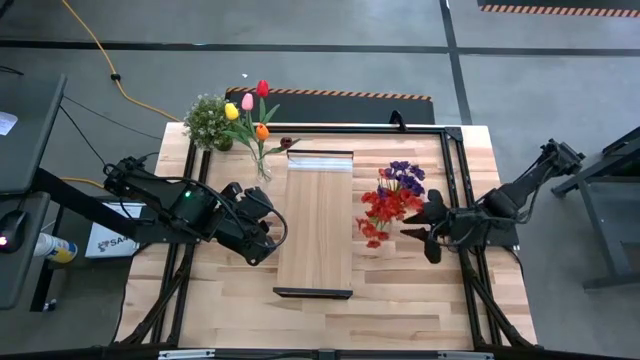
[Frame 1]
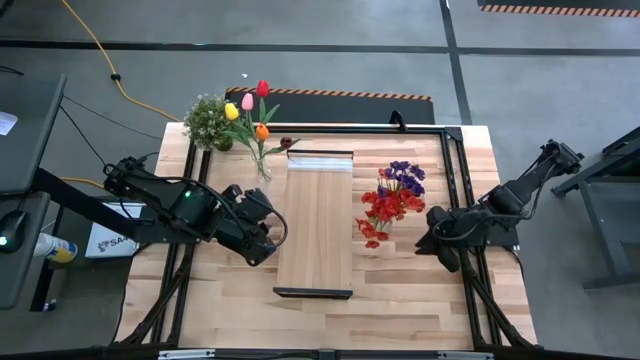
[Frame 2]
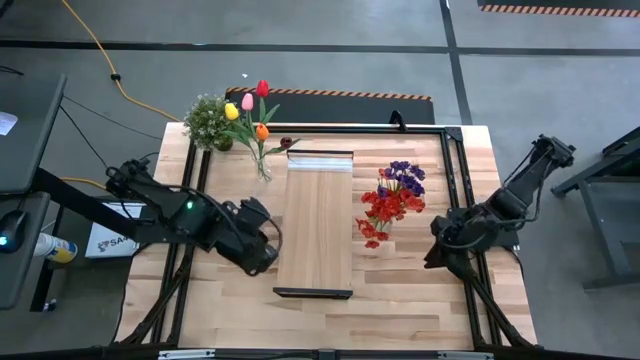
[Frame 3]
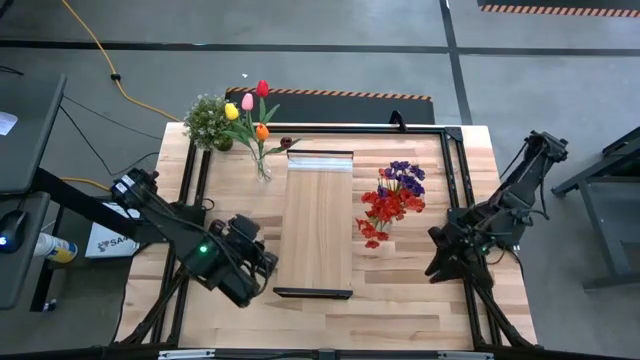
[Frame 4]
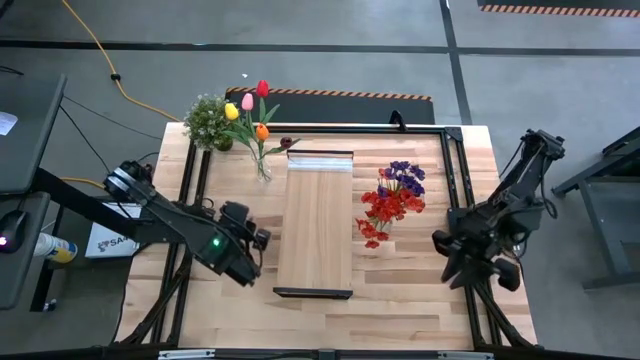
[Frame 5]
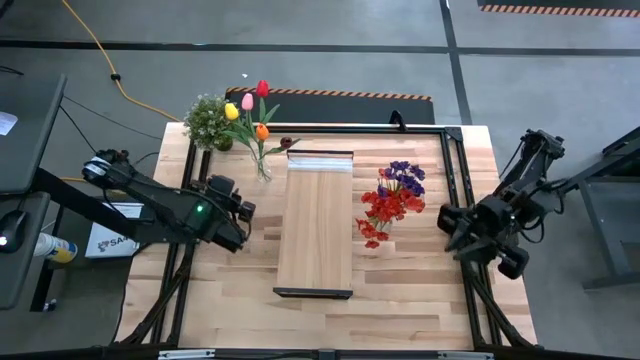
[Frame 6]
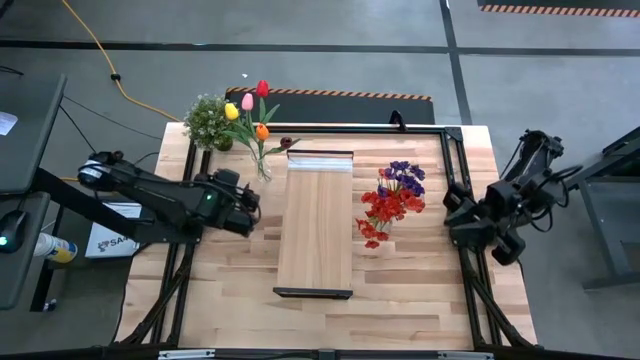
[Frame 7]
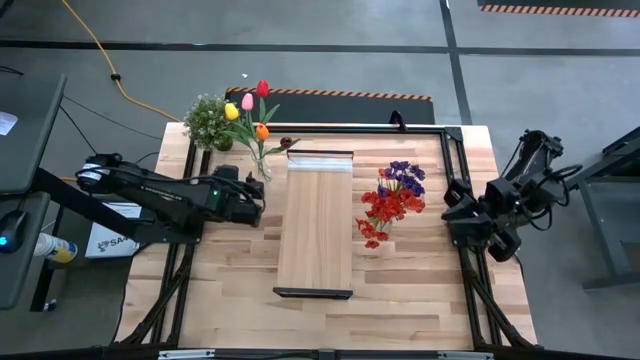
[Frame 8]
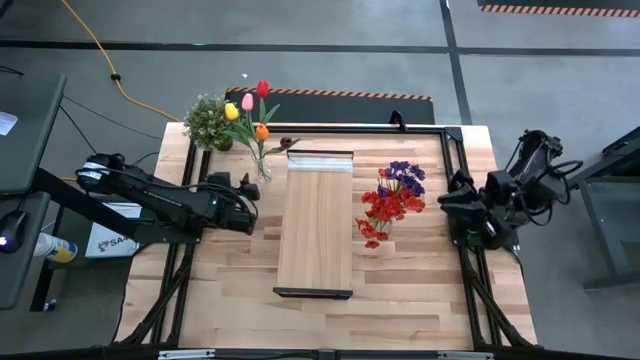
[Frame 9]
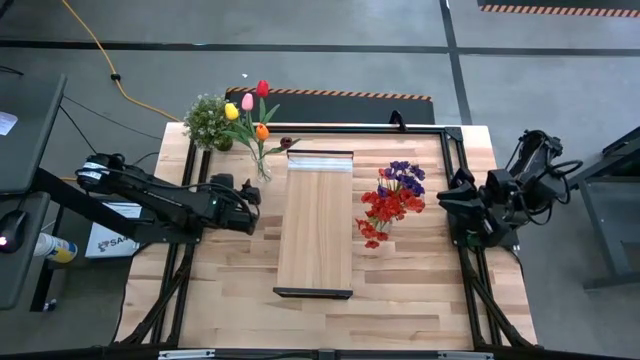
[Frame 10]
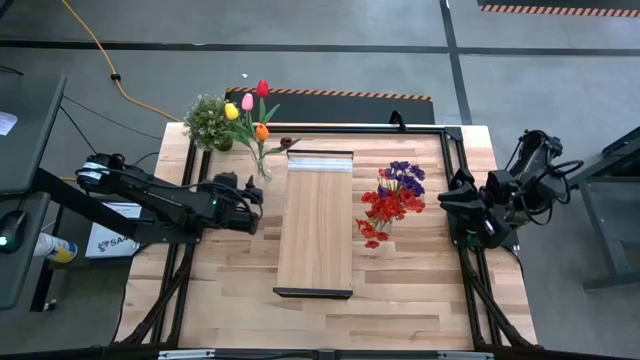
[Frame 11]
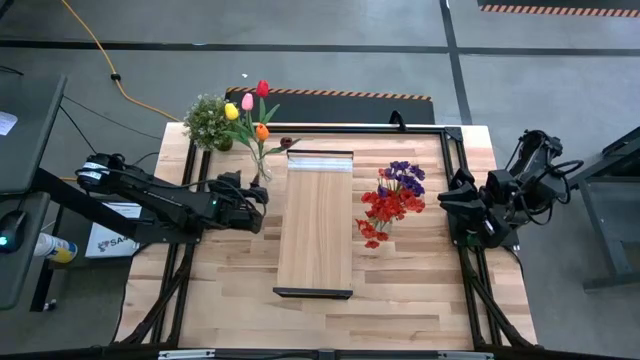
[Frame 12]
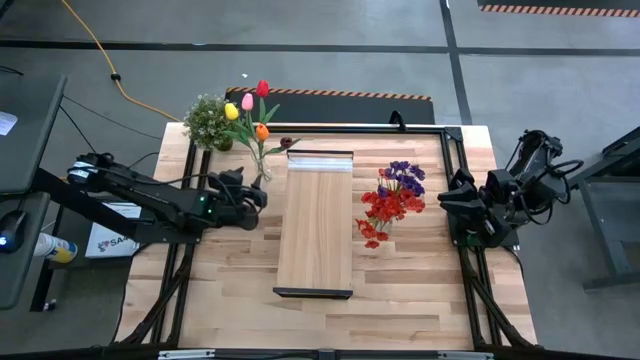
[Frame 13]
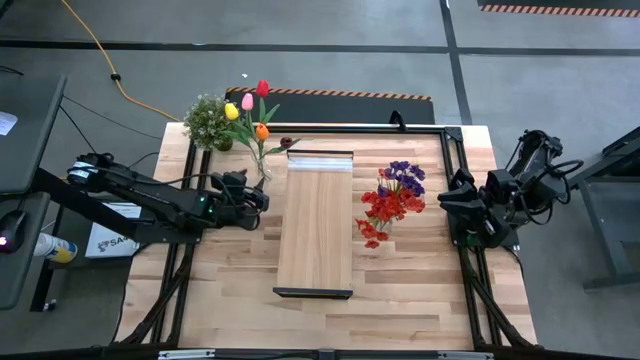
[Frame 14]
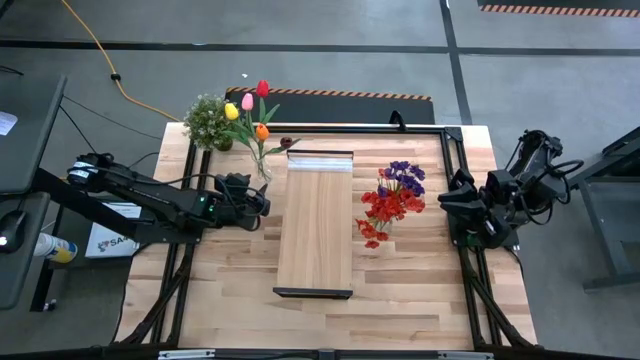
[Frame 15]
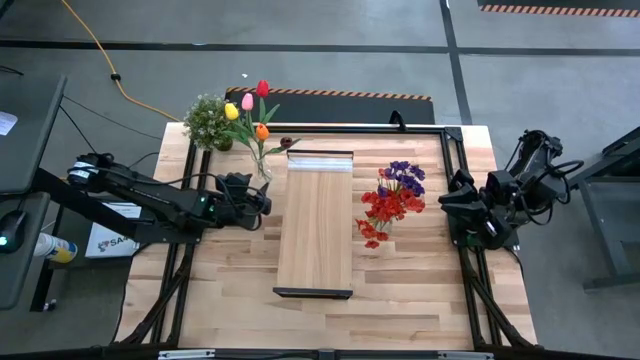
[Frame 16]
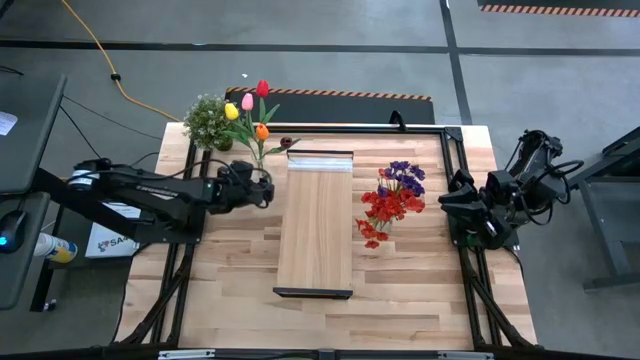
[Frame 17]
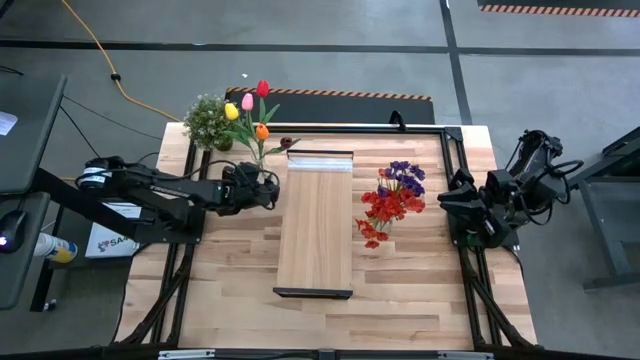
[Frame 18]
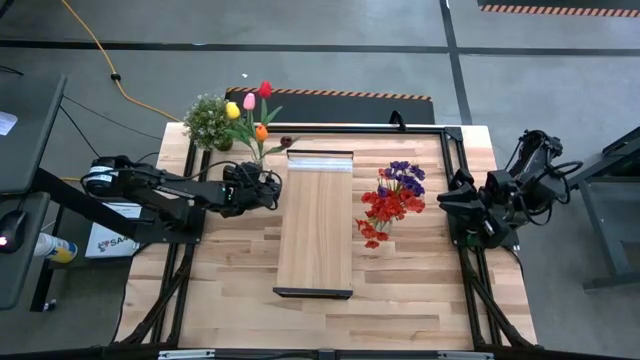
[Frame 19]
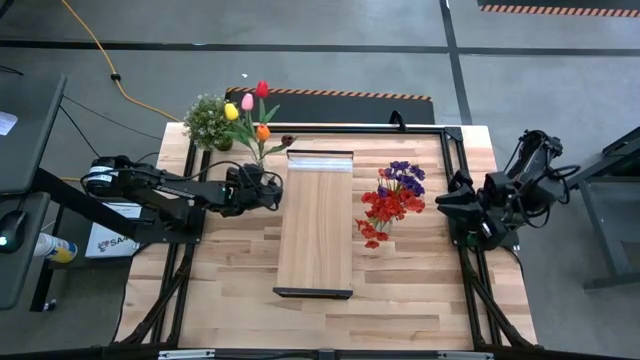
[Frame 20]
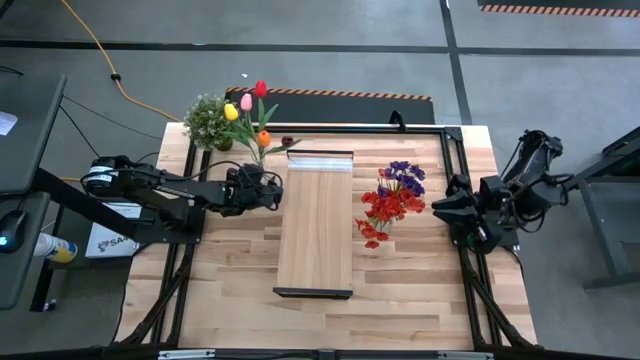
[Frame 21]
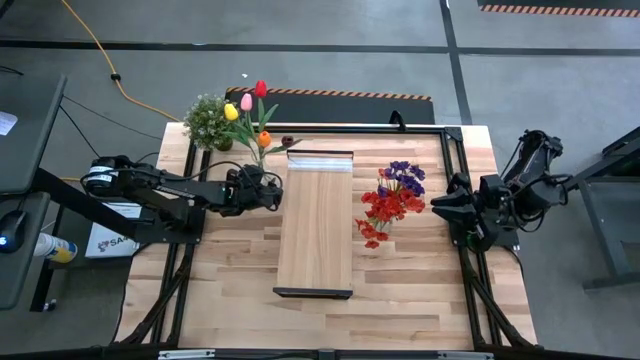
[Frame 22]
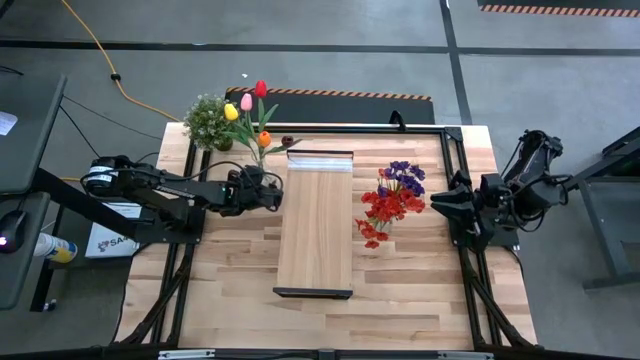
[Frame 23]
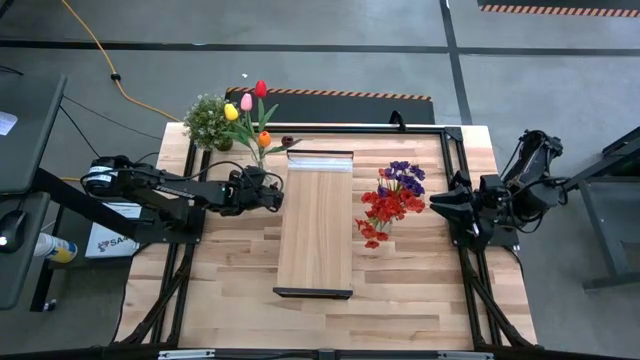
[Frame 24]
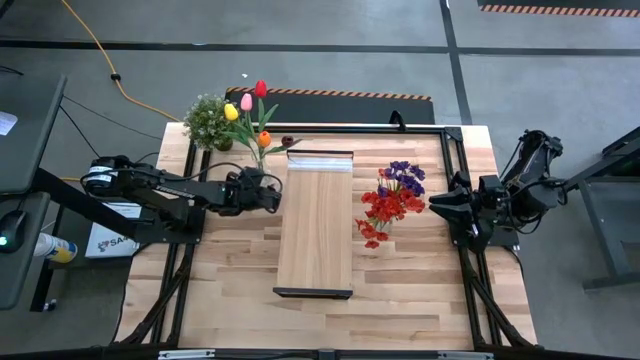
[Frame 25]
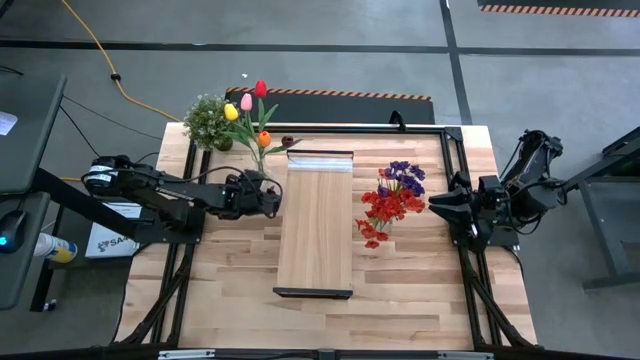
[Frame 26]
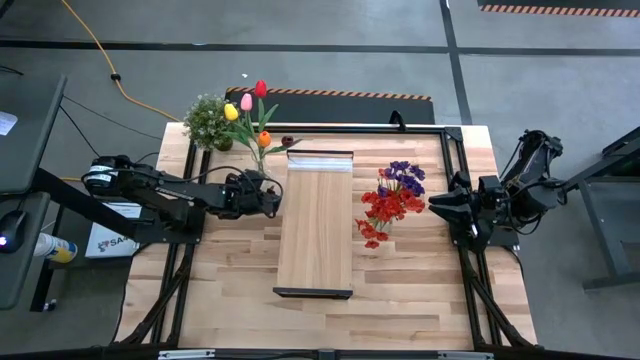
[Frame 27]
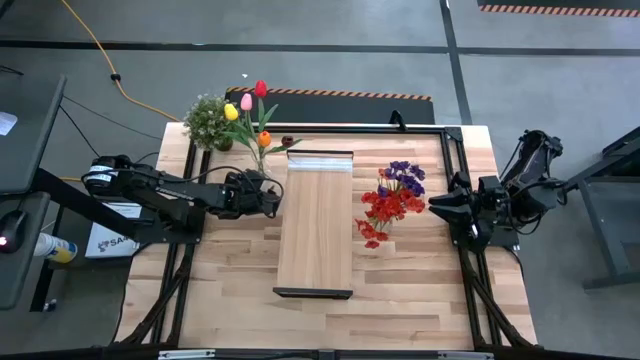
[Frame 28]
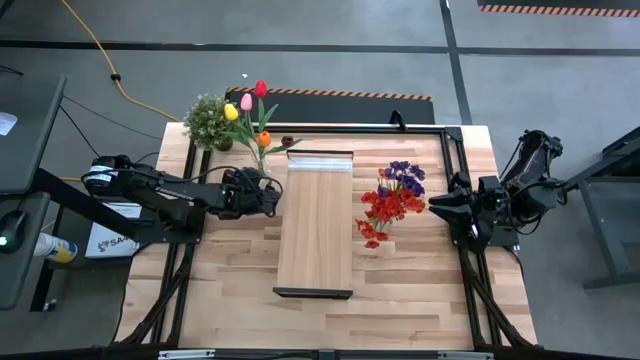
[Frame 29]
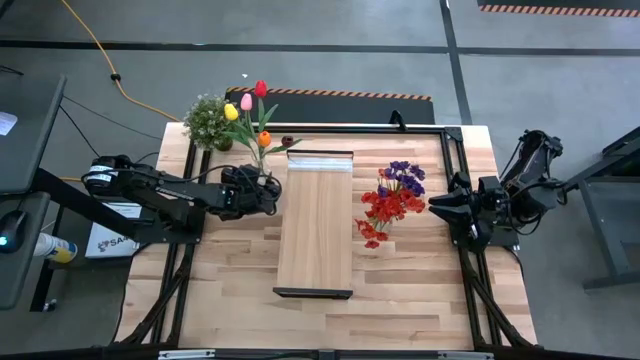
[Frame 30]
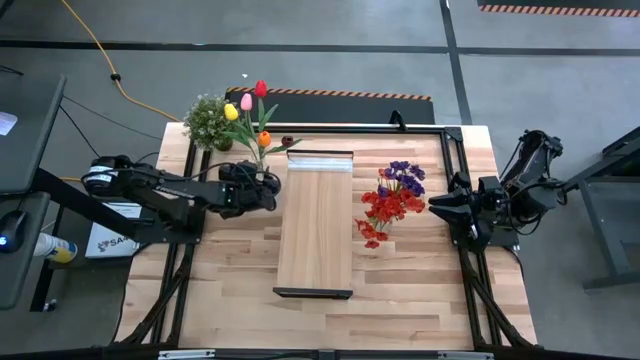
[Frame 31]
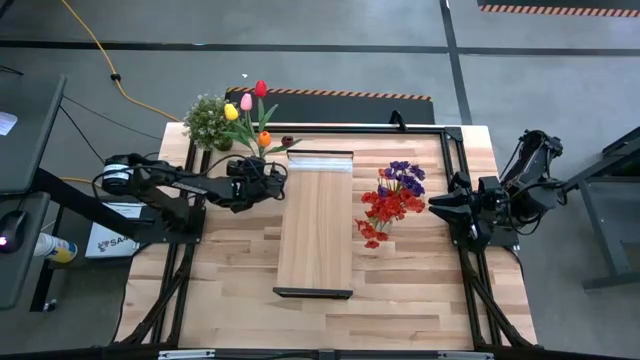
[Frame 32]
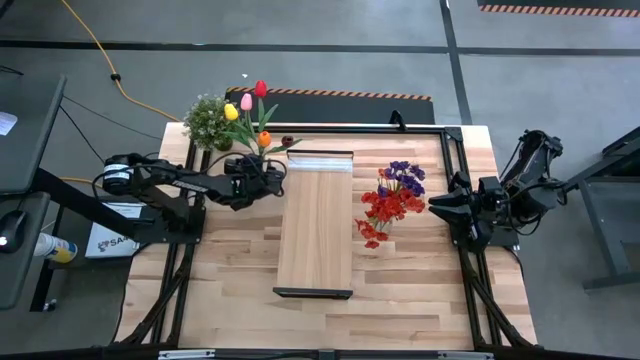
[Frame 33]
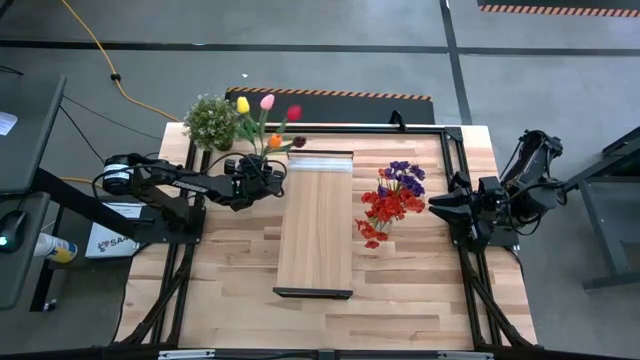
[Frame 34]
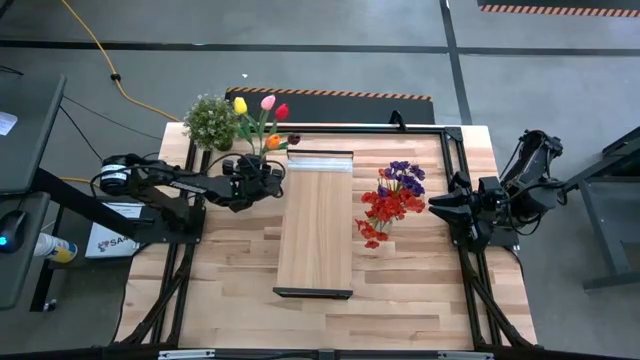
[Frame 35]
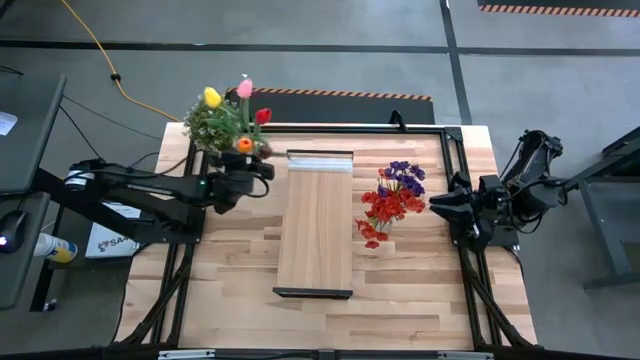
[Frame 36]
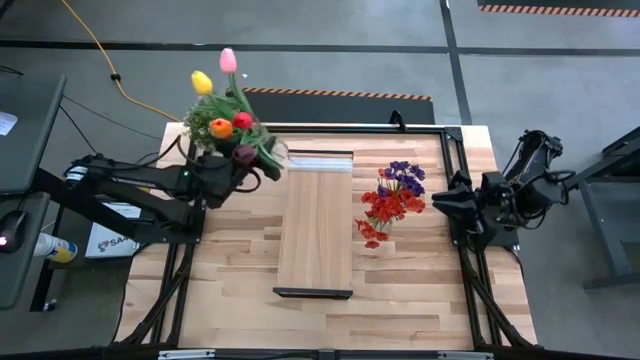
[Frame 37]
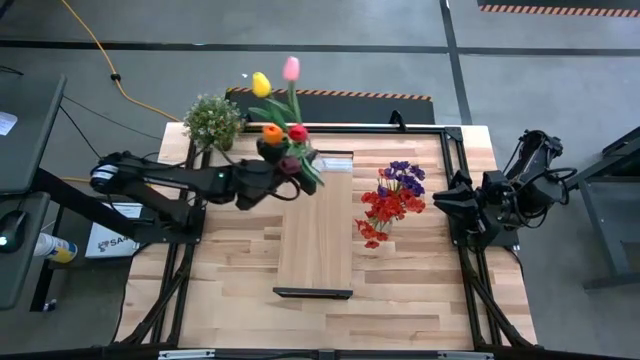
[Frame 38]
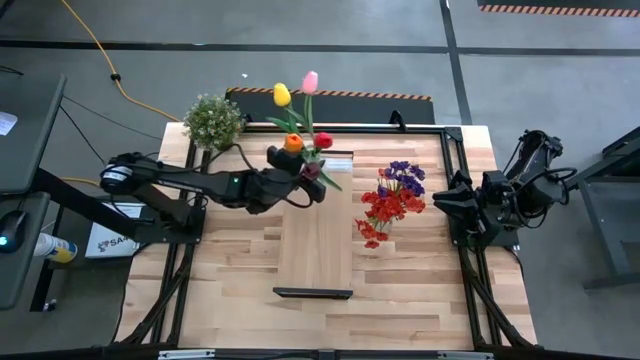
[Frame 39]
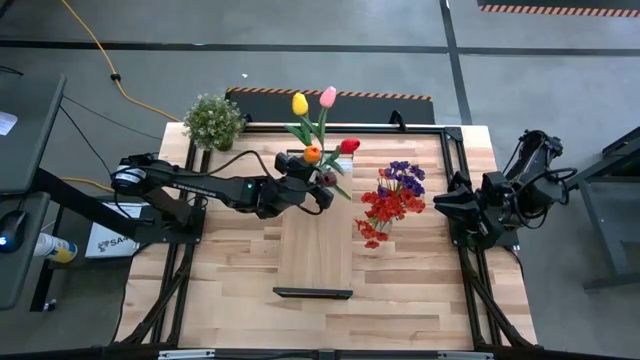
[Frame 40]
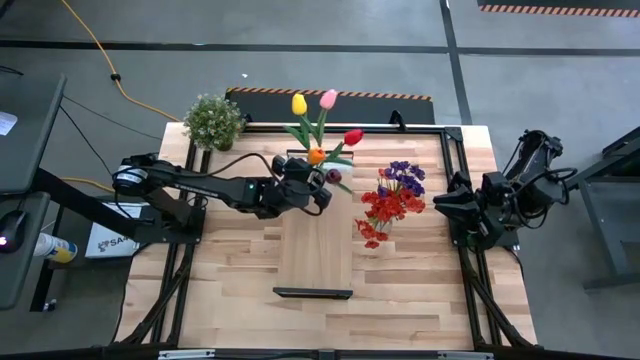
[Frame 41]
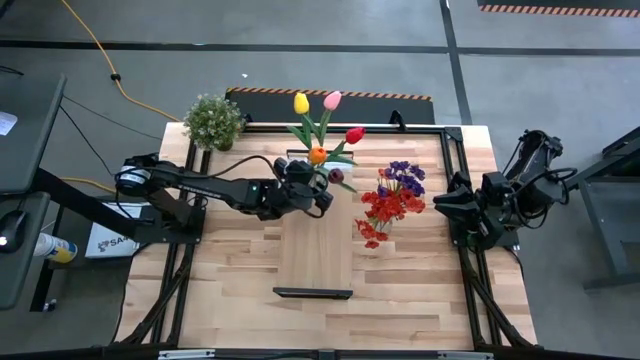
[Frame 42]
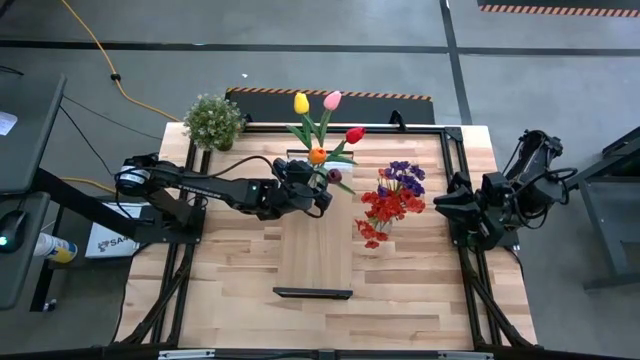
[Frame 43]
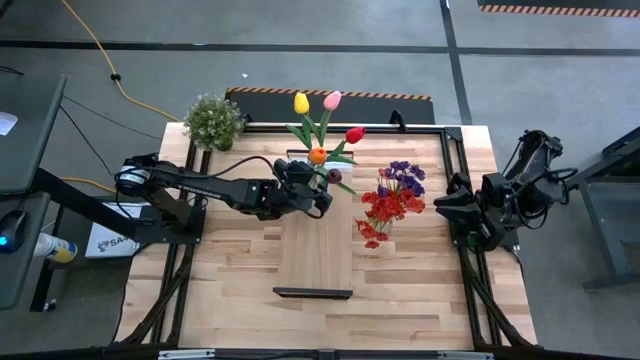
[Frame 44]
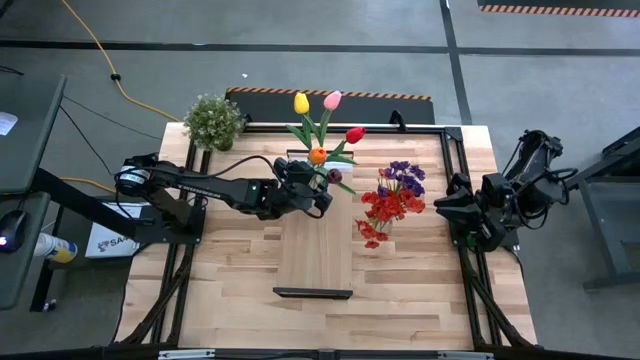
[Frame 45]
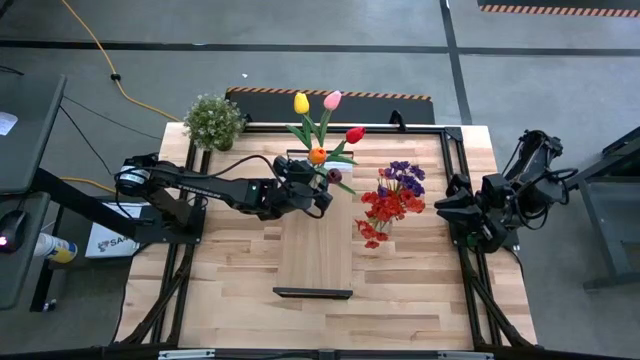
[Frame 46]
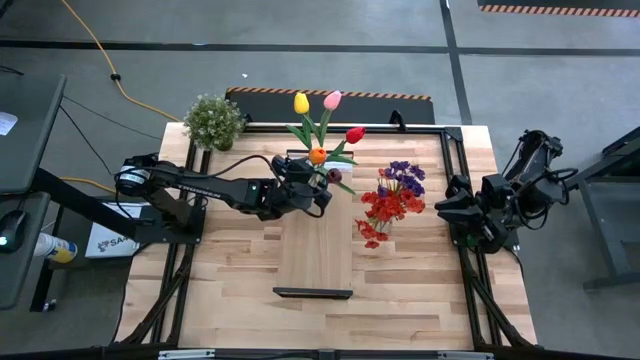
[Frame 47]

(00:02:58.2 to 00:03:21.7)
Task: Pick and place flowers into a vace then onto a shelf
Put the top transparent vase on the shelf
